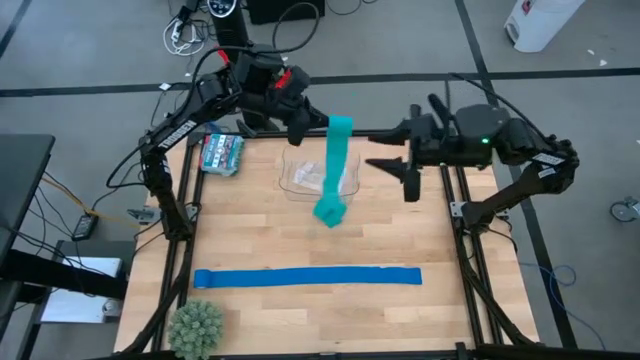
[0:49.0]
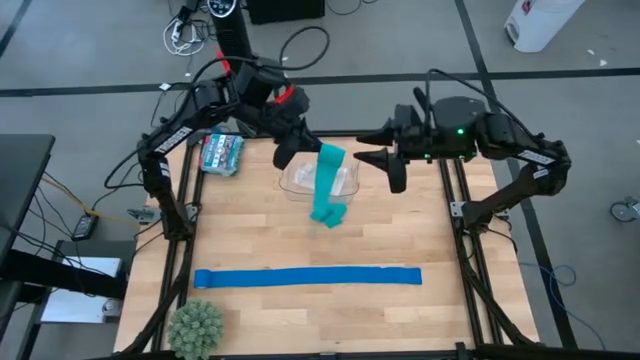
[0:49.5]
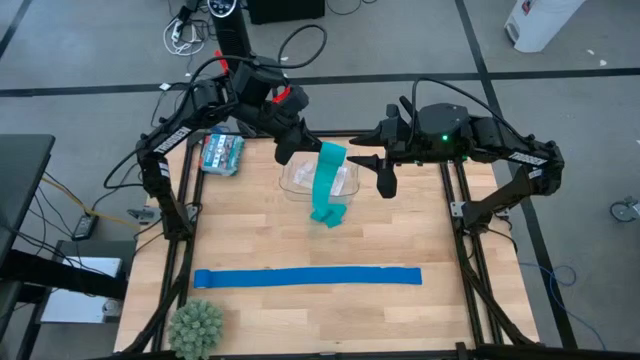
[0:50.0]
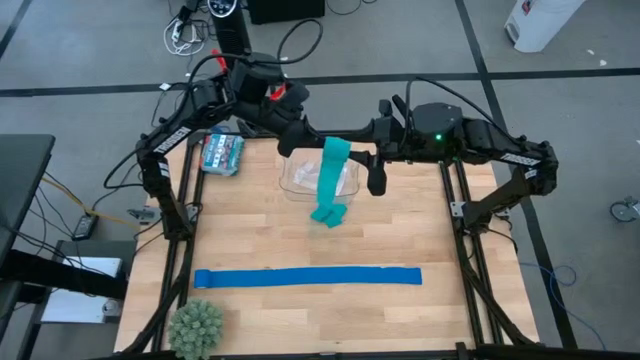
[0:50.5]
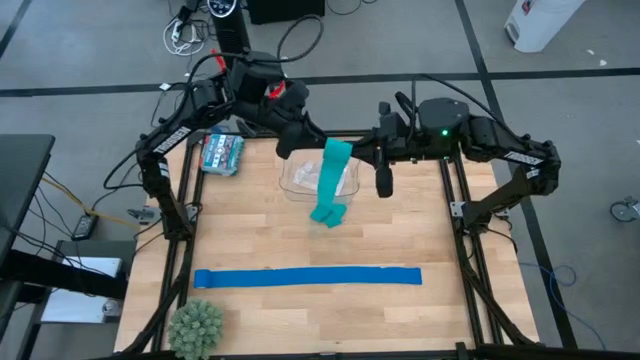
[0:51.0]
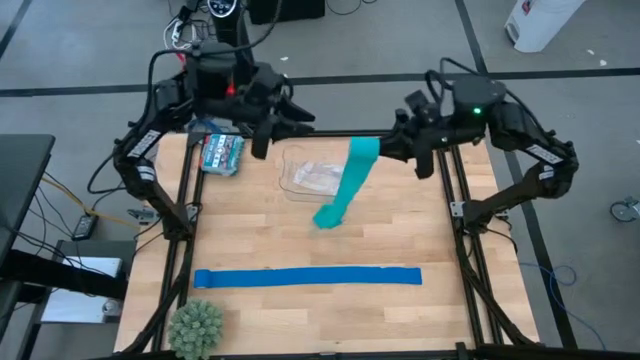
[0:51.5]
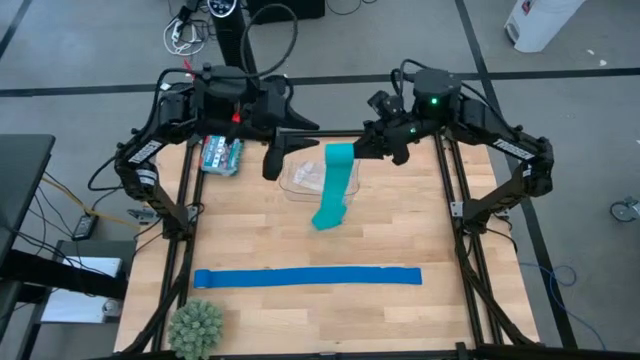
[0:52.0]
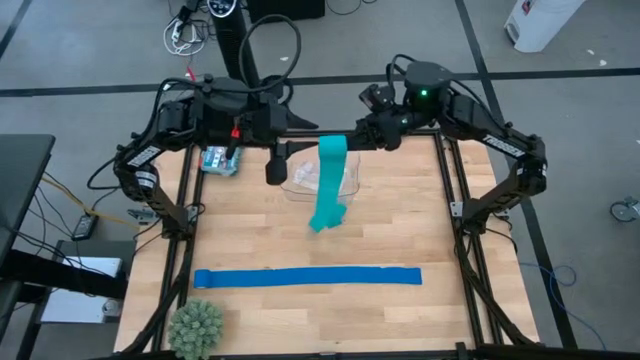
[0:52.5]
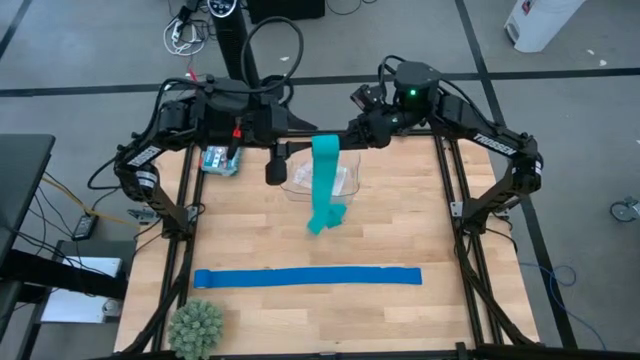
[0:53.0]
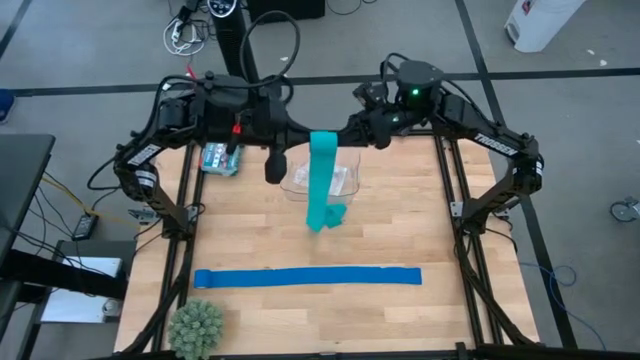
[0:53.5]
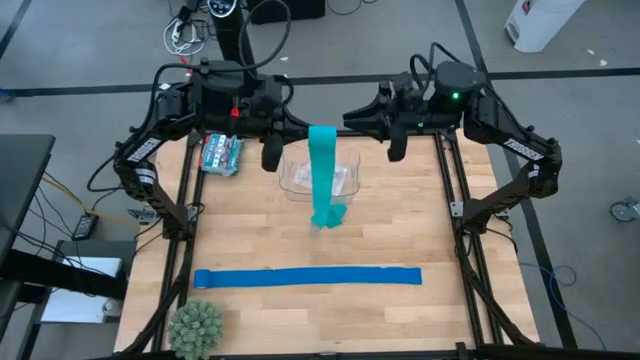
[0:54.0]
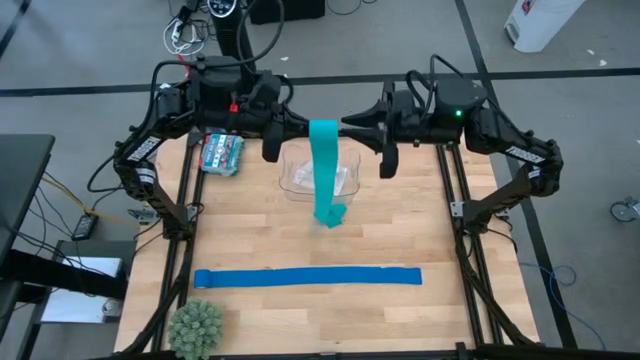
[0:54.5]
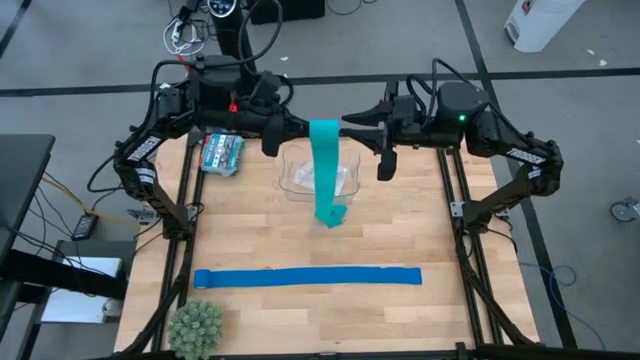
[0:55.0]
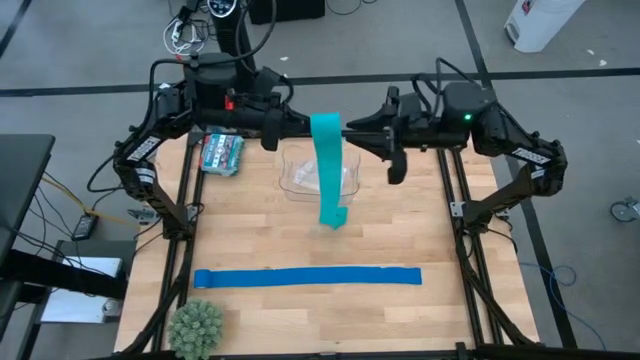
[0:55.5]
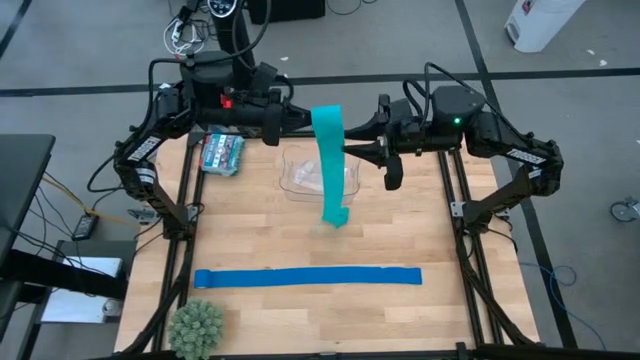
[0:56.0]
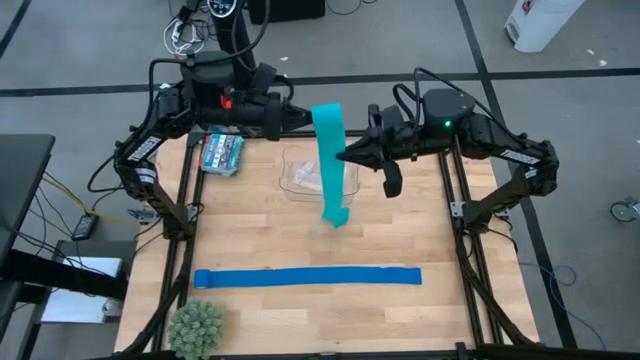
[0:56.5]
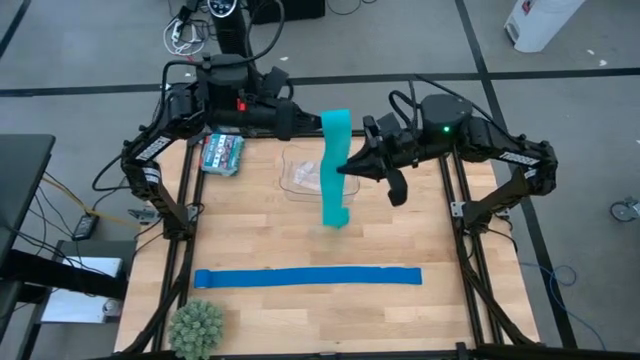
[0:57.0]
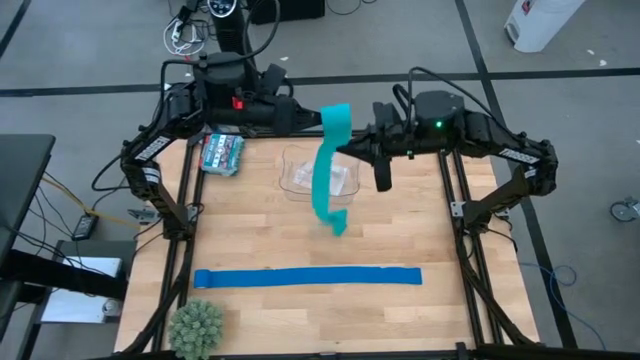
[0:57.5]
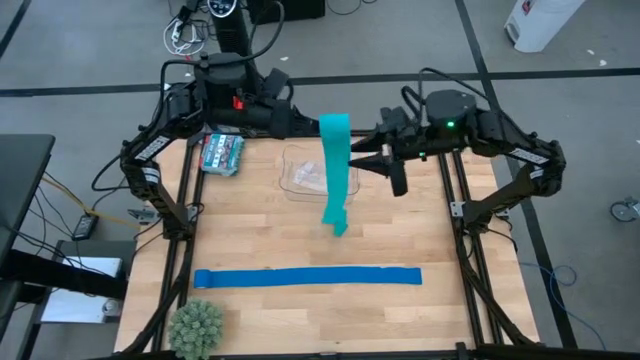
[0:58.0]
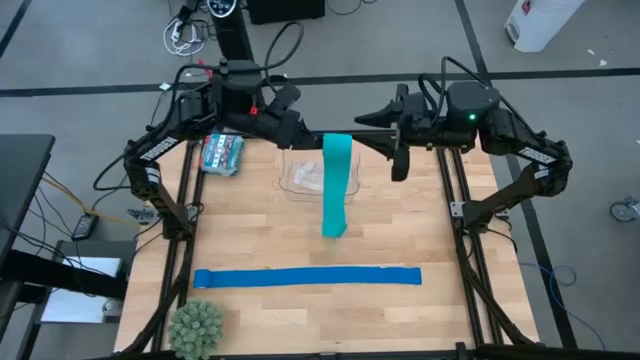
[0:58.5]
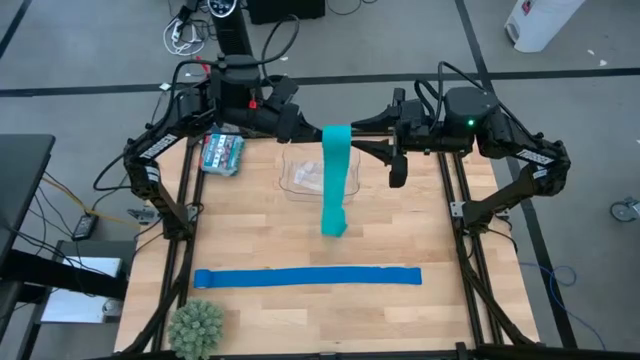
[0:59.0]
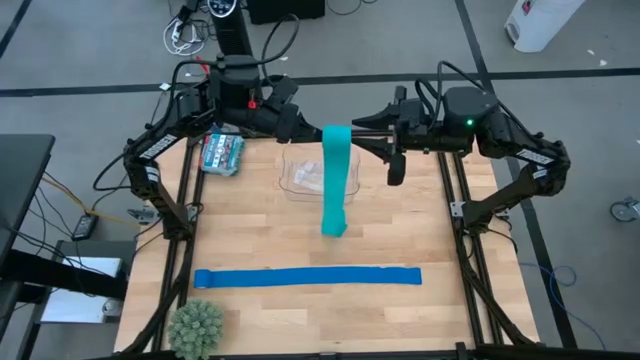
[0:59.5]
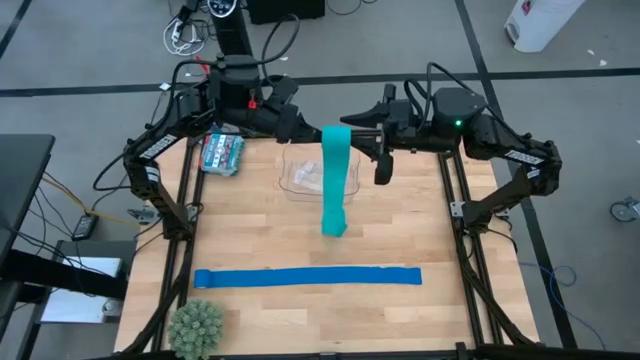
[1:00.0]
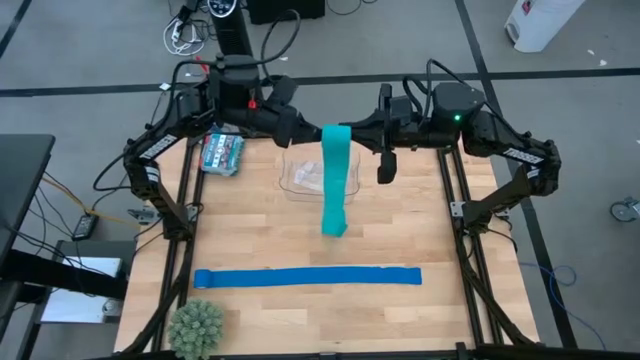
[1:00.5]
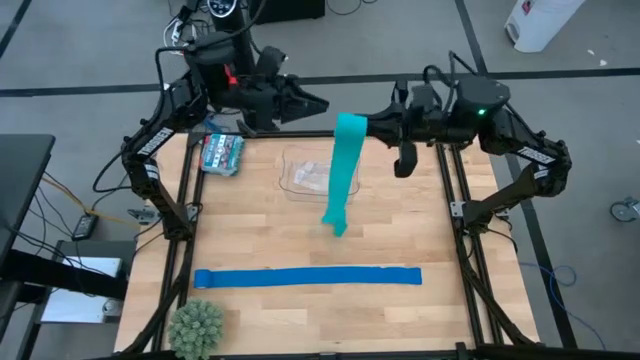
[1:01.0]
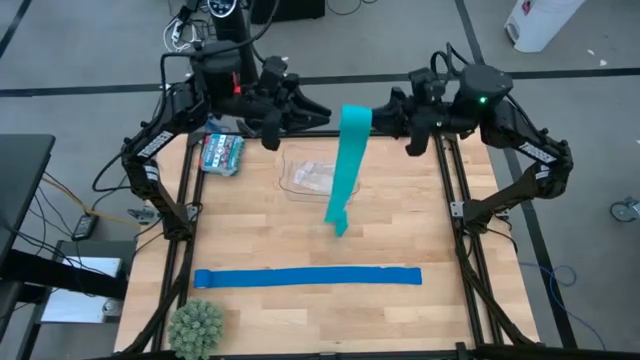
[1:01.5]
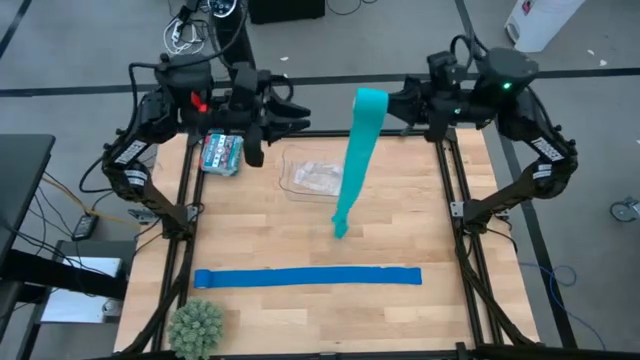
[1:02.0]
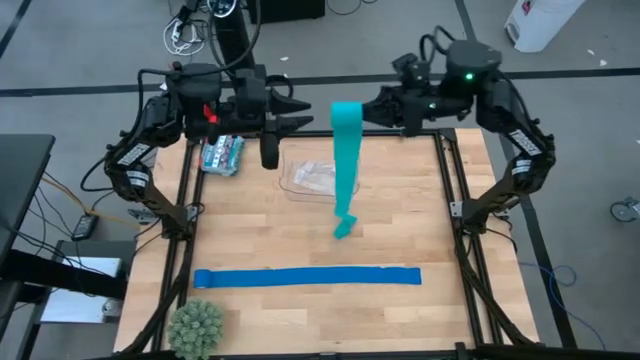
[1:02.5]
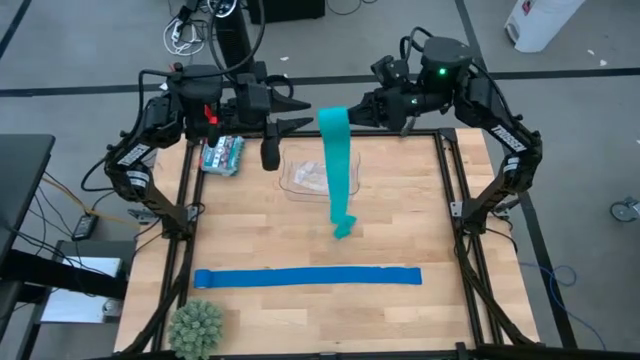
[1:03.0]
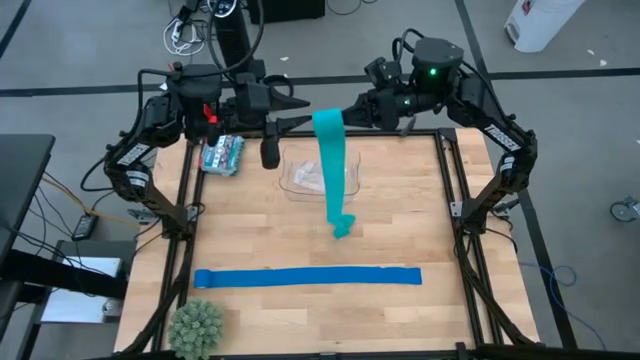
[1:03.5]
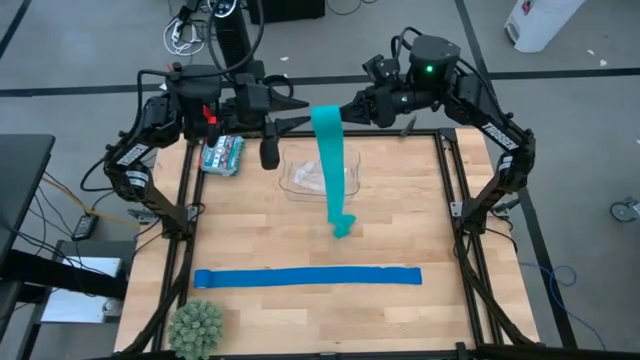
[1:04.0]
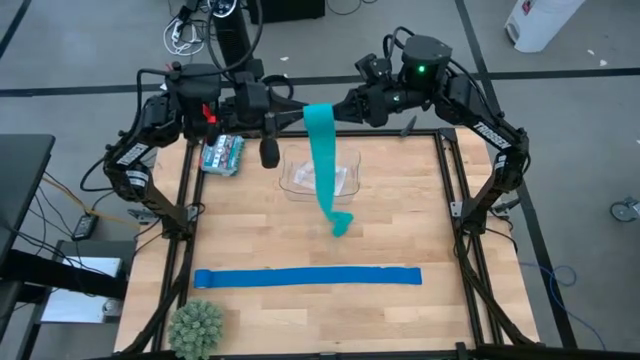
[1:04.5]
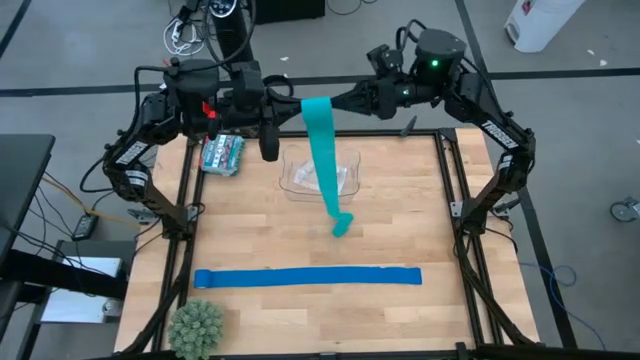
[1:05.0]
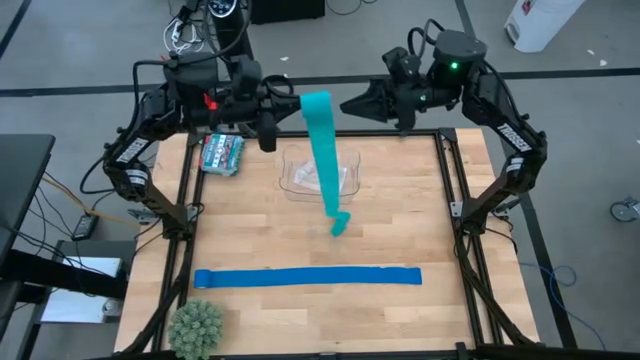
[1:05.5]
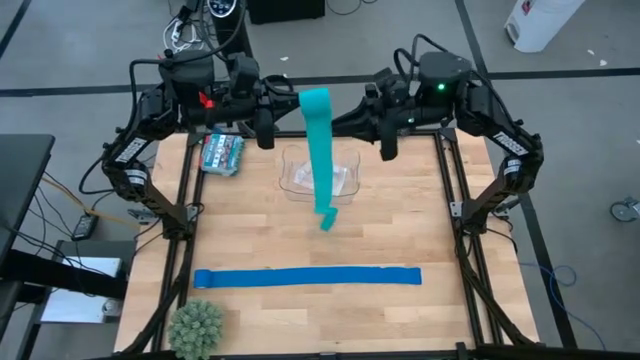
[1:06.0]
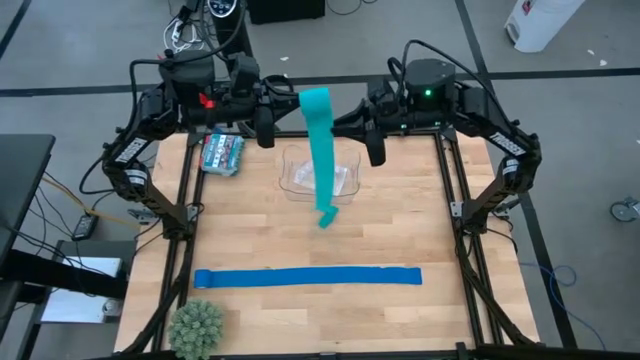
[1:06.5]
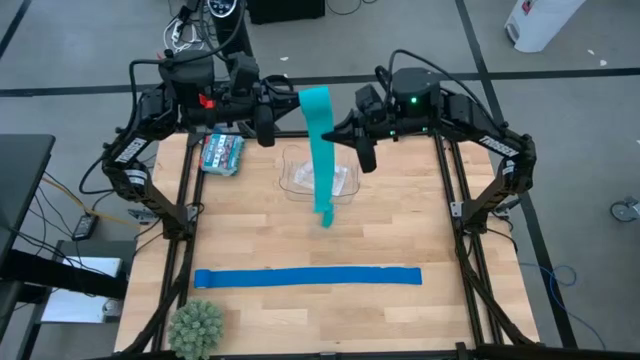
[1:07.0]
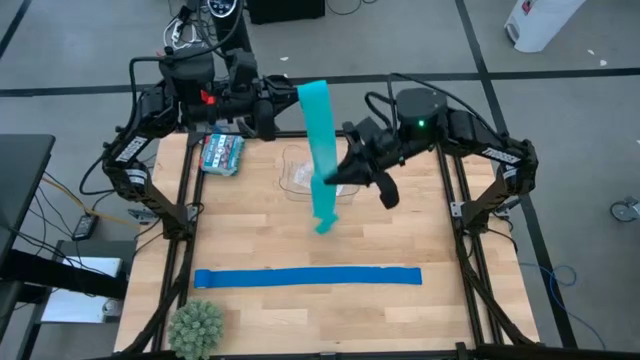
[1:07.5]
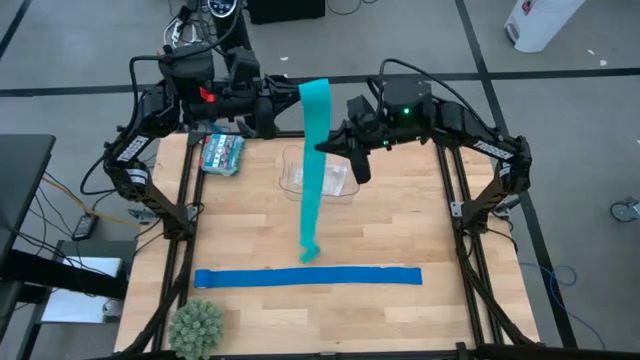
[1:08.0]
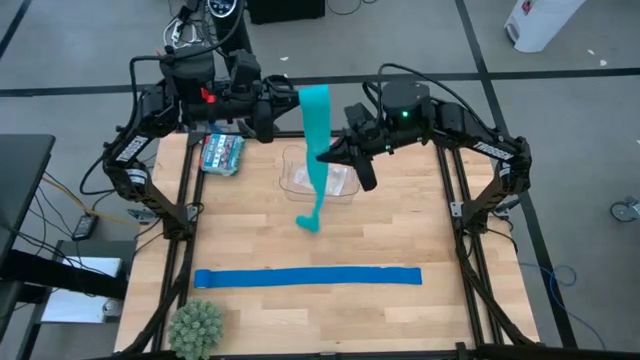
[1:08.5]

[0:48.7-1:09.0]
Task: Roll bandage
Roll the green bandage

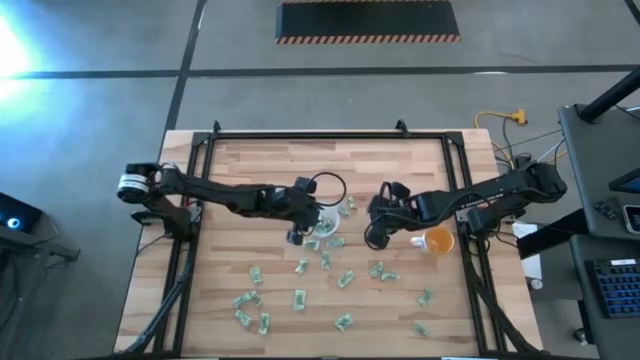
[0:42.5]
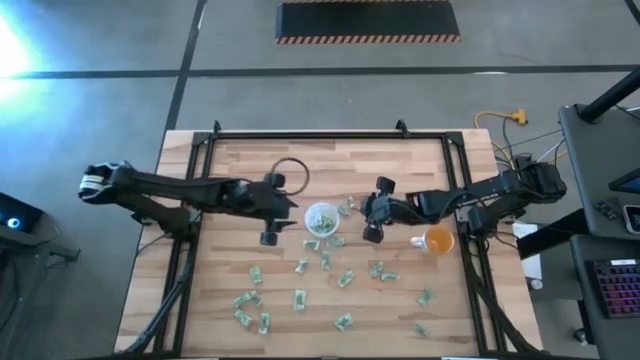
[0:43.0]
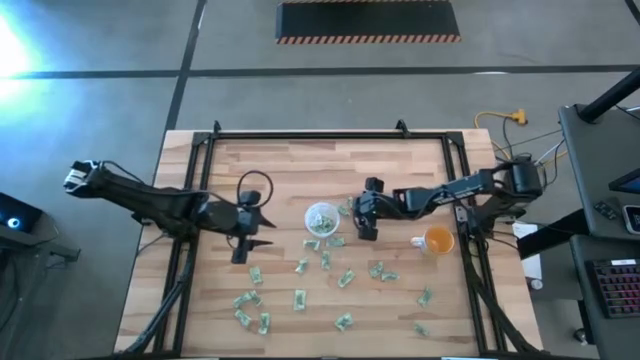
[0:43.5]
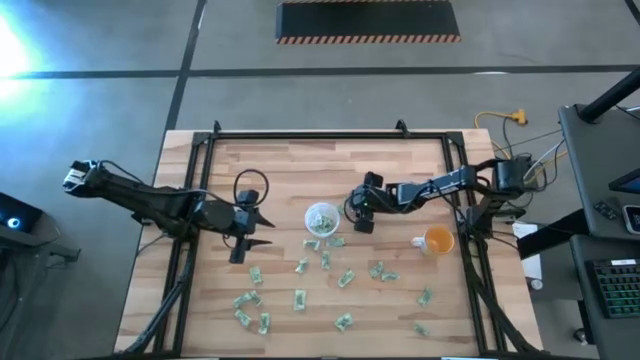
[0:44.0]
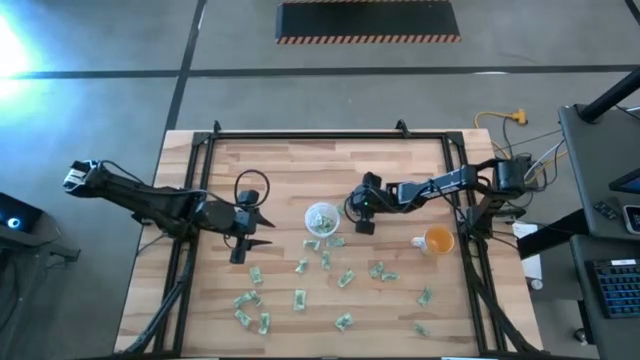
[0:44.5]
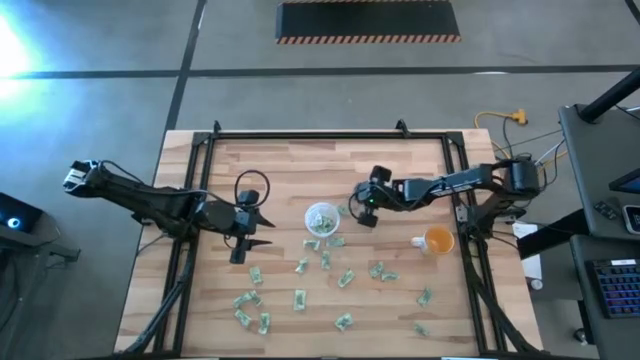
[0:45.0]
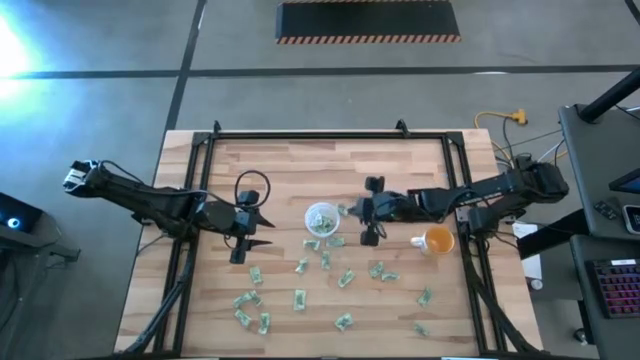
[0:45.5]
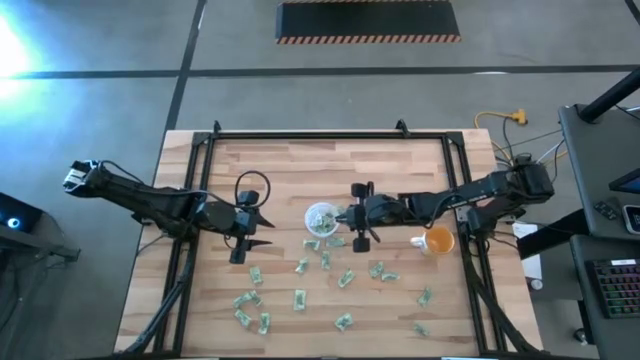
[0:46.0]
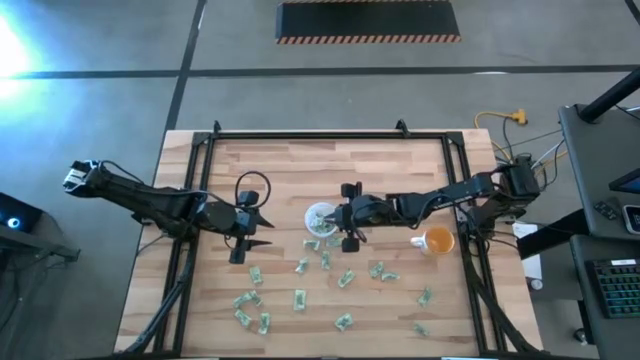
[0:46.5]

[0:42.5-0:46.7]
Task: Pick and place Stevia / Truvia into bins
Put the light green stevia packet into the transparent container
